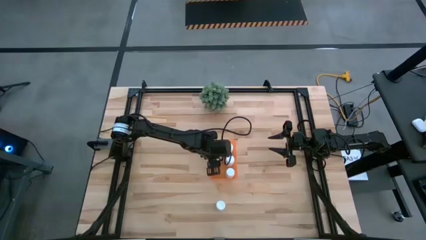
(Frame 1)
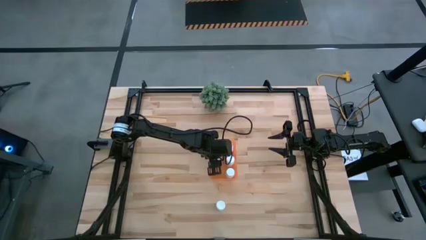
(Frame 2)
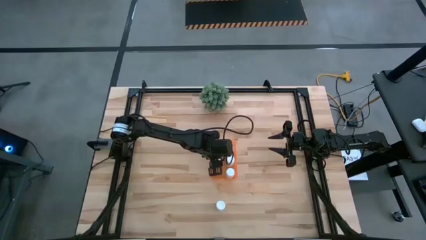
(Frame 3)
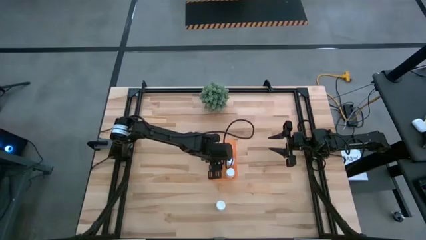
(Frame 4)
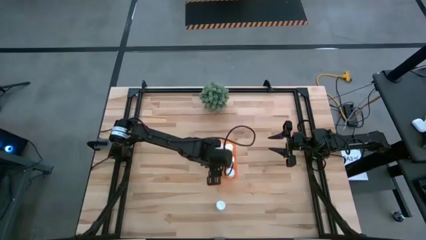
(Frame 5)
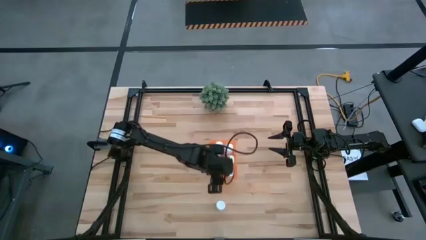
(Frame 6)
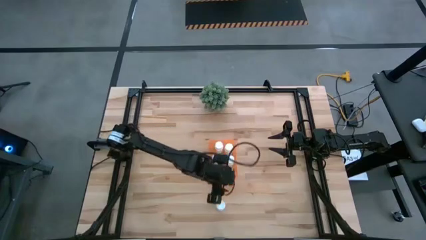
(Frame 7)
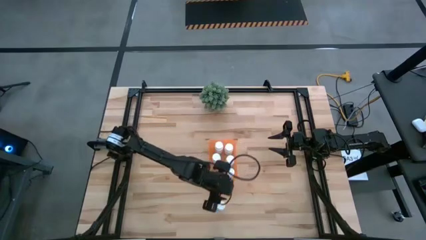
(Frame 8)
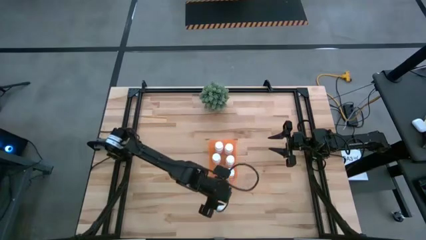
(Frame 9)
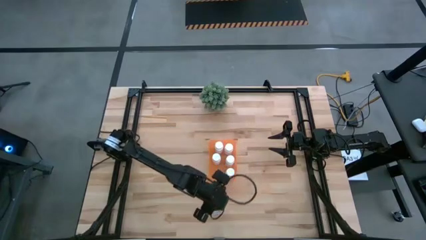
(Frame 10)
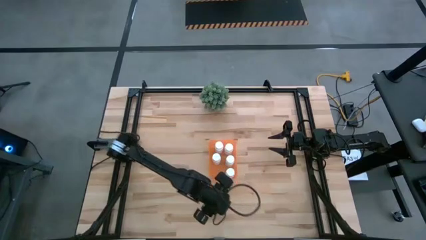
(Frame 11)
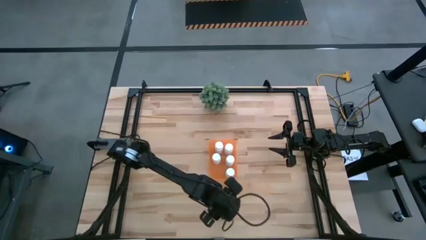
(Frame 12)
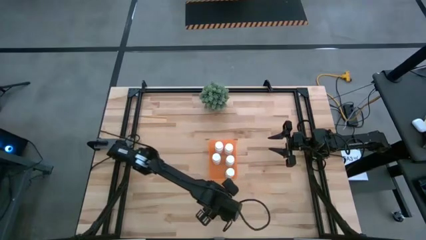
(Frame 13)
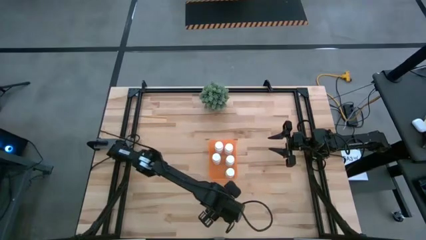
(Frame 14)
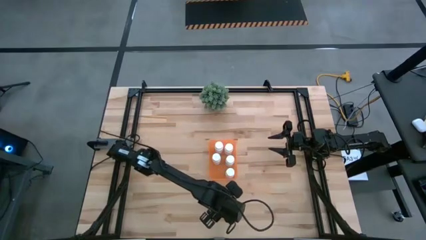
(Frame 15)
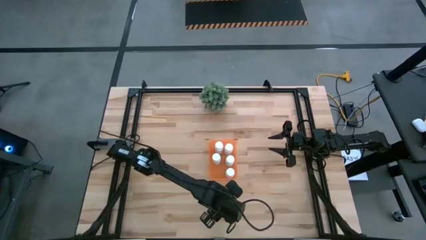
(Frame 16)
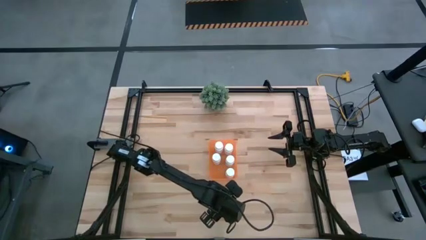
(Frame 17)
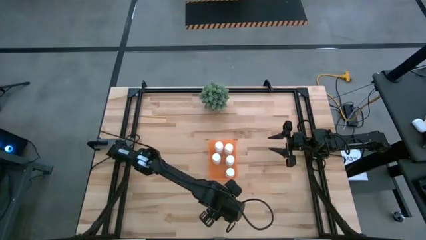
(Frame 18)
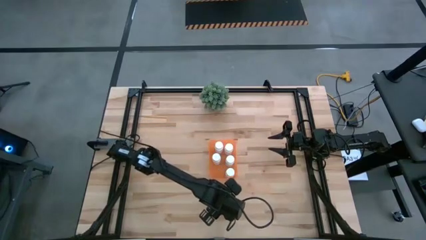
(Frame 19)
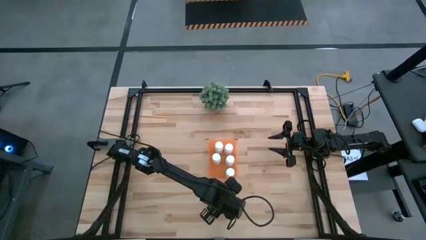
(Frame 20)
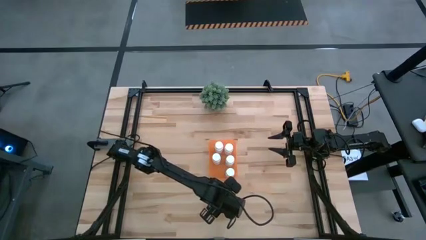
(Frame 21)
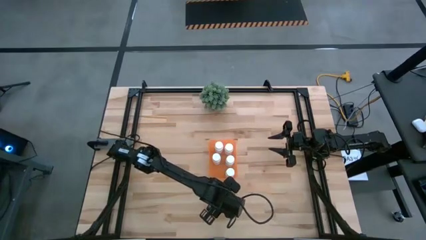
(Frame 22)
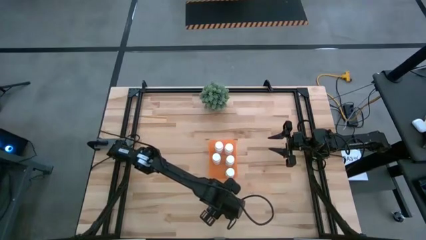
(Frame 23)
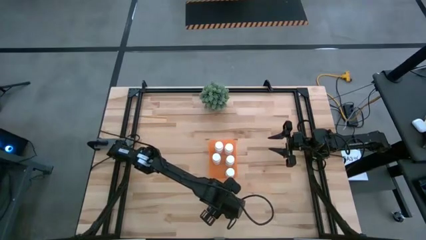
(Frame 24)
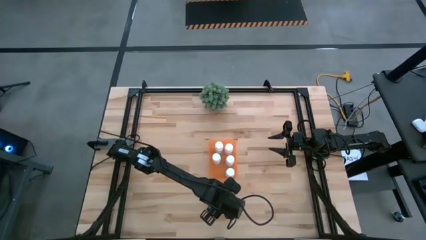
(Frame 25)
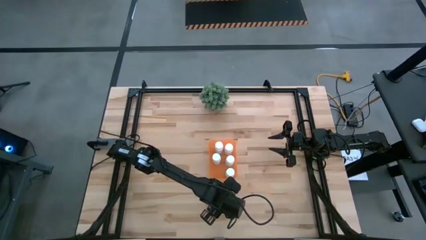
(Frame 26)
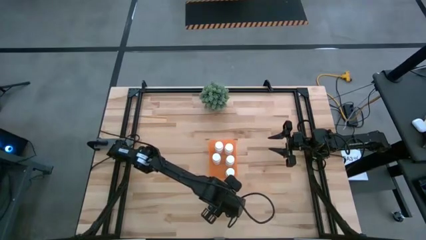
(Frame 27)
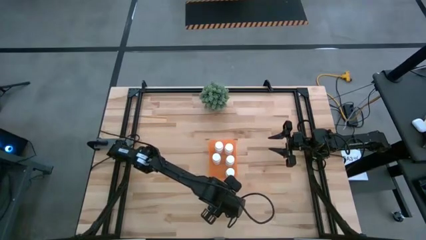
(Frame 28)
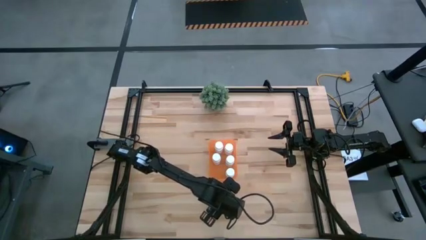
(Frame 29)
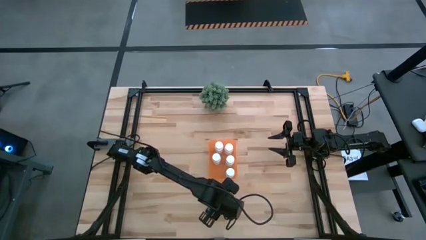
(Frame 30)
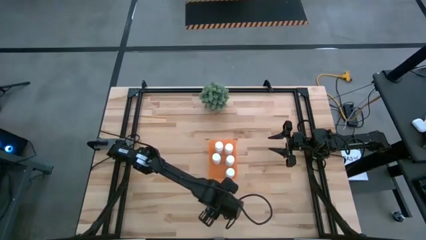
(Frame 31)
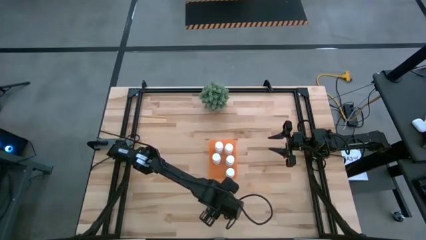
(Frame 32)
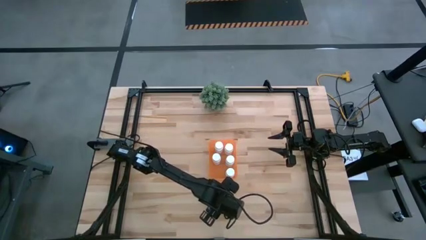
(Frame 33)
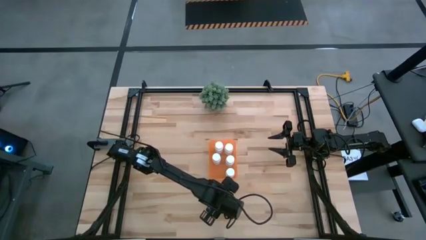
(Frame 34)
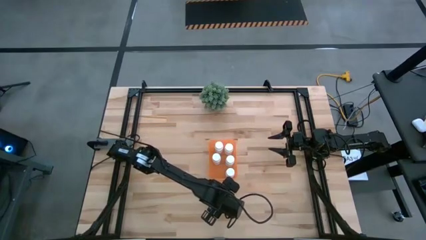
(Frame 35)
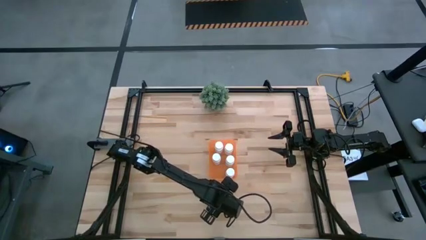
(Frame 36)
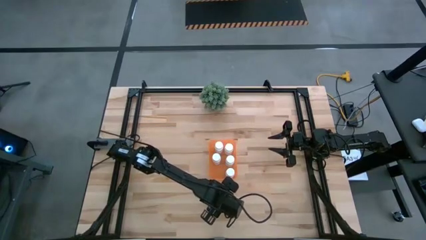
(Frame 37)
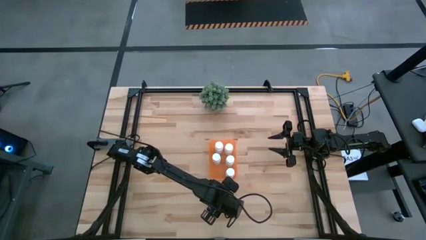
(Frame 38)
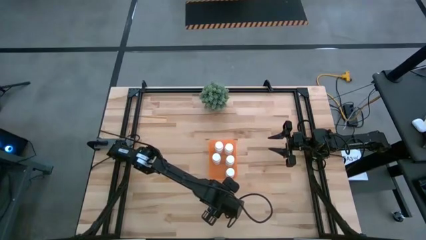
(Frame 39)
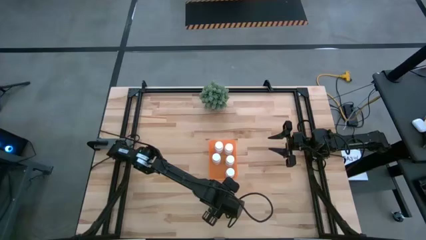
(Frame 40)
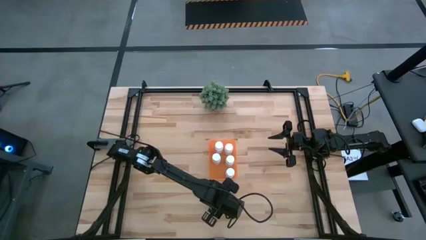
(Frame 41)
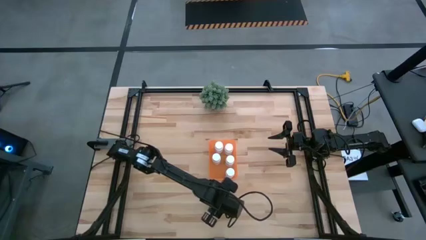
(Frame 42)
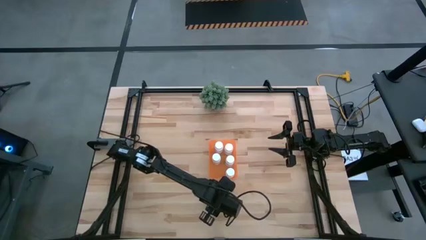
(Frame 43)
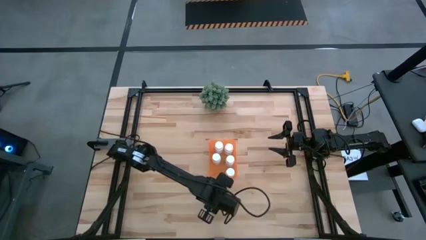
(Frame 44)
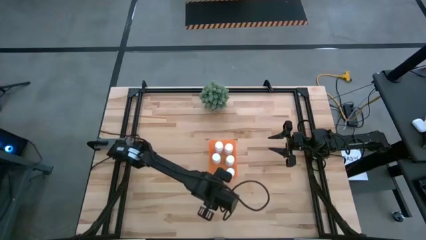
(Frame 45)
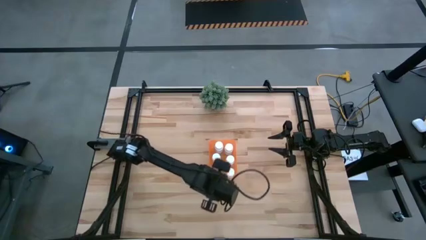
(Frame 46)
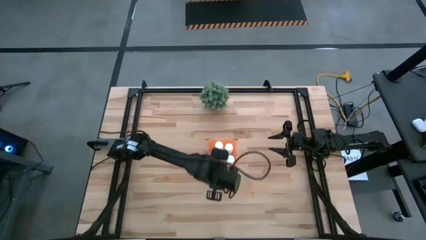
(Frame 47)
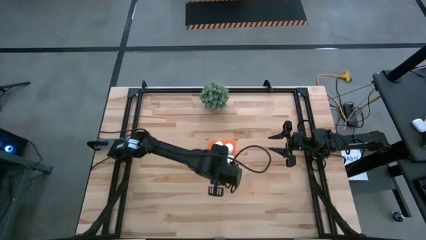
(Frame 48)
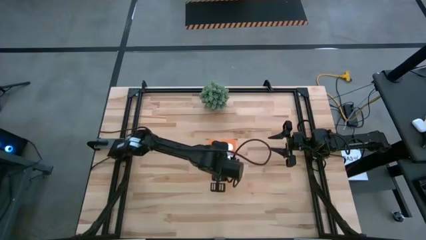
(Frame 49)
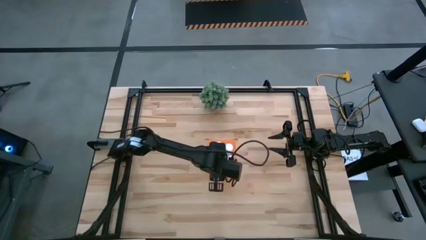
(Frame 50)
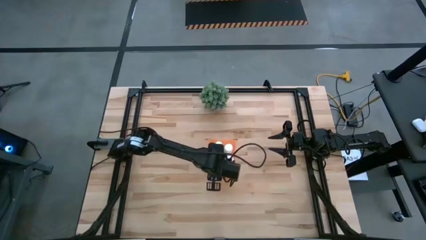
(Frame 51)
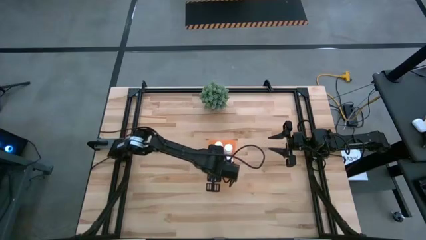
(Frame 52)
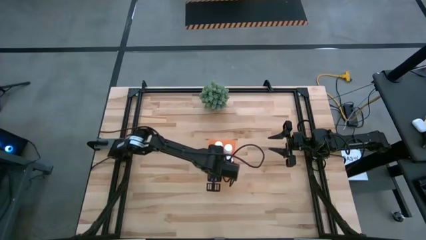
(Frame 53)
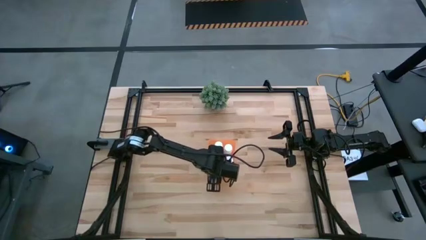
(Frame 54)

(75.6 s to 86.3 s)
Task: Pick and place pill bottles into a basket
Put the white pill bottle into the orange bin

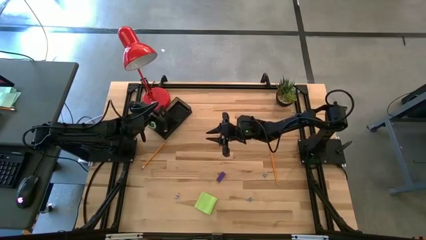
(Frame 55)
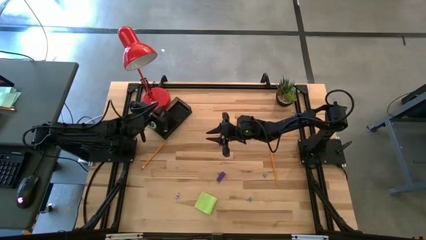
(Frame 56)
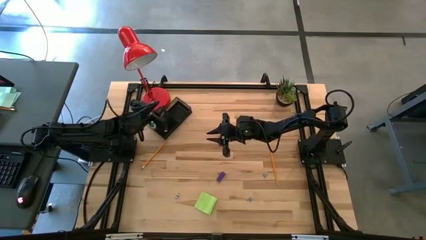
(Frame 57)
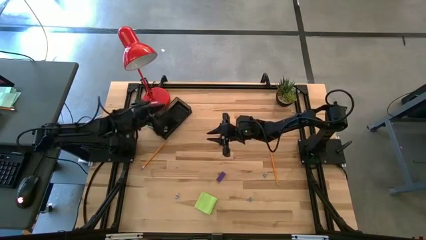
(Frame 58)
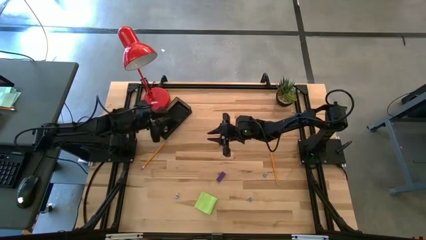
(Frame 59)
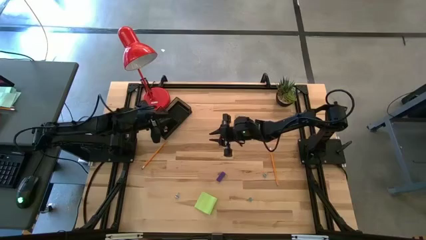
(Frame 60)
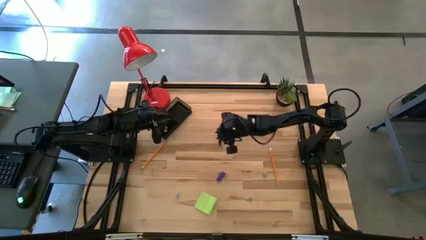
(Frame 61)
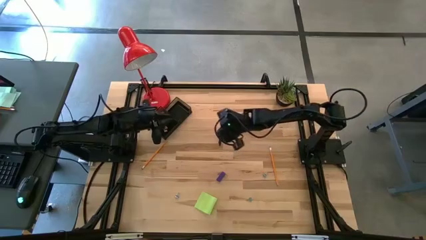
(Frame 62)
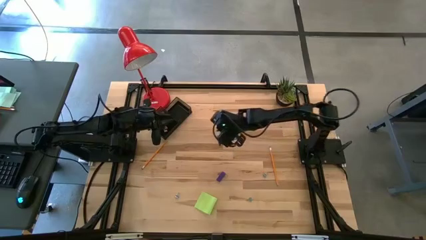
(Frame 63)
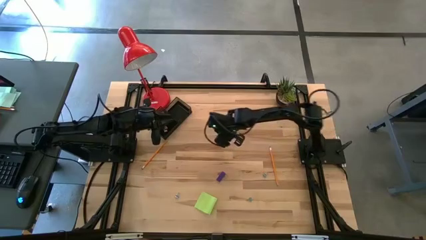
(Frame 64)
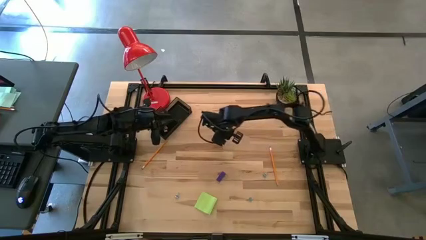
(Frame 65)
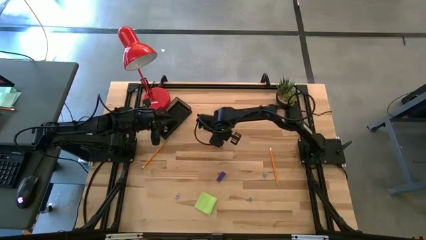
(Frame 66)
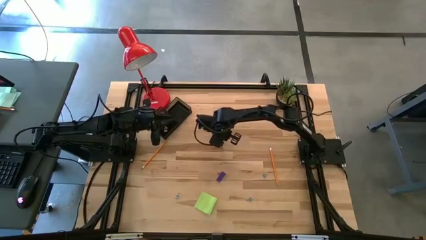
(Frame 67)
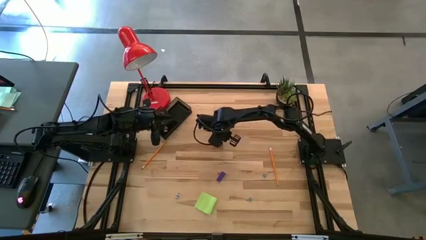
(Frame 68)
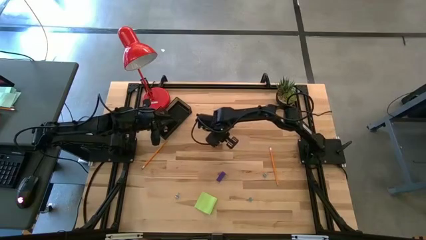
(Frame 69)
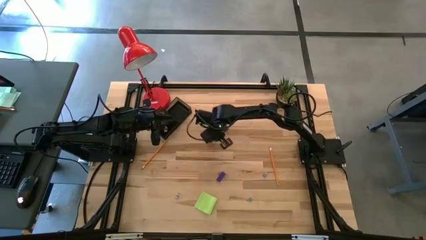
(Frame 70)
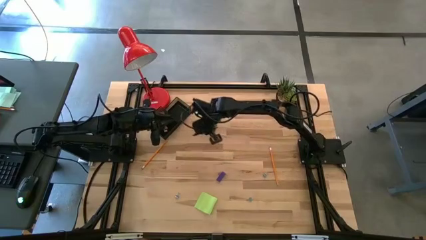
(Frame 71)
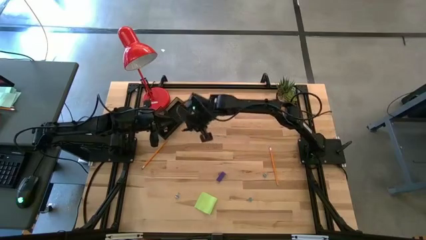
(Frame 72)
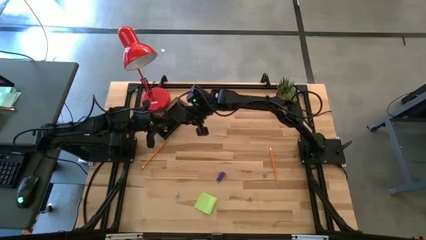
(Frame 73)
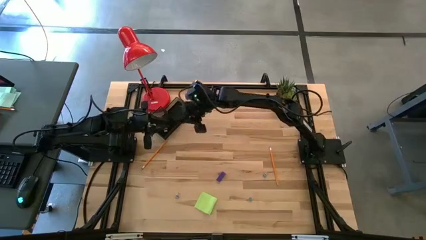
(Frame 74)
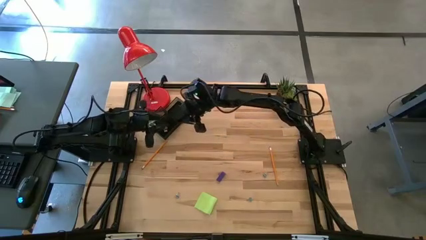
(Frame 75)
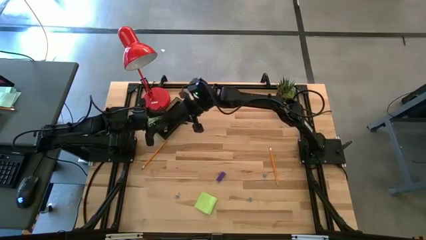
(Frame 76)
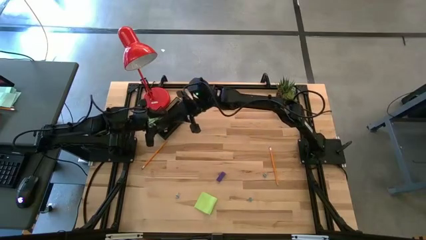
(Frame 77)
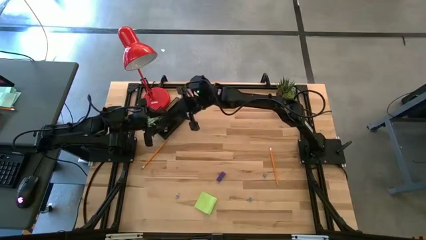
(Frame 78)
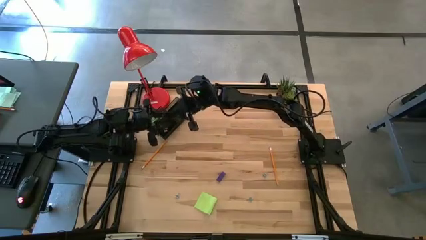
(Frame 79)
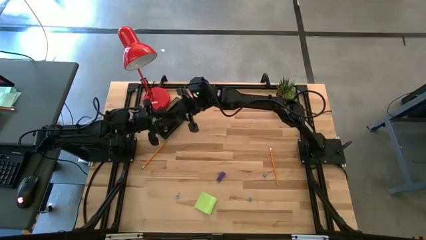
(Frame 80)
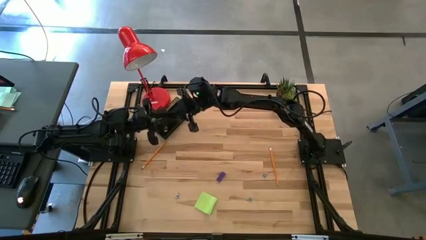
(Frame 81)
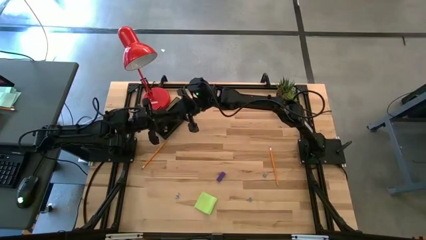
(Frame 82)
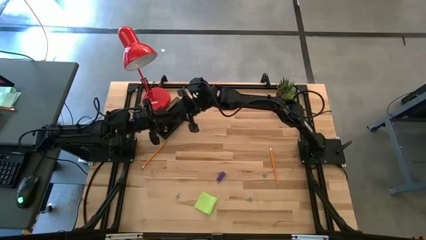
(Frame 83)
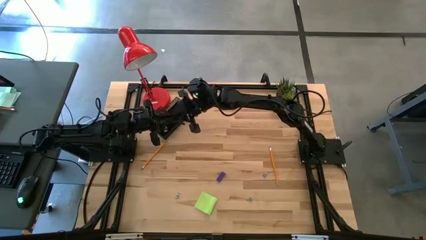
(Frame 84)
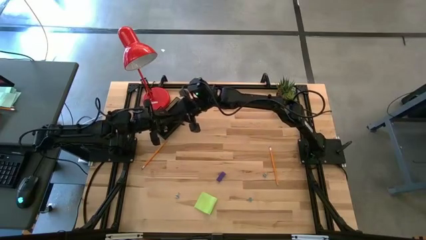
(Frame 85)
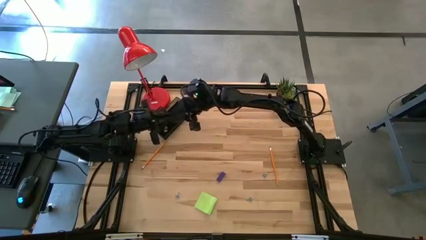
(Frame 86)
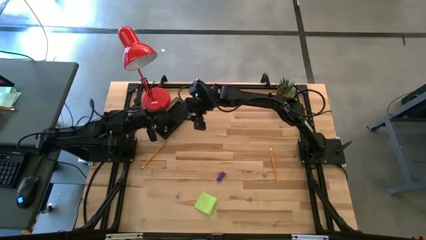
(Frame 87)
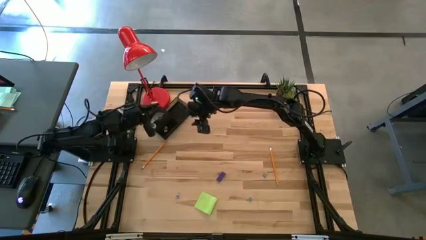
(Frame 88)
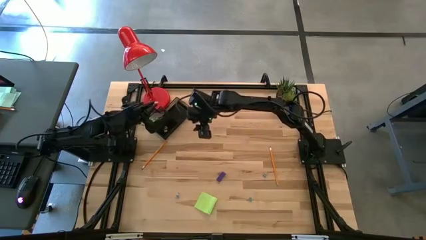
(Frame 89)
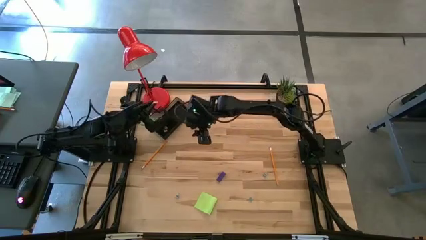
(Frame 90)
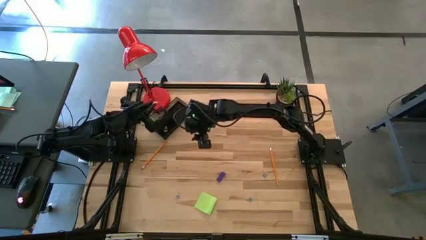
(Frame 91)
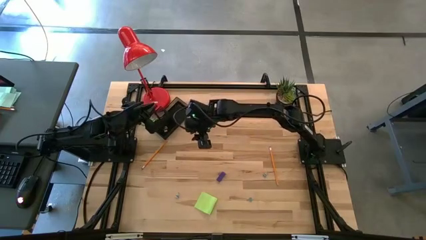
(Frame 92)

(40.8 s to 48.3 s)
Task: Pick and place office supplies into organizer
Put the black pen into the desk organizer
